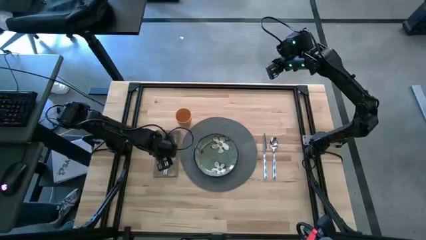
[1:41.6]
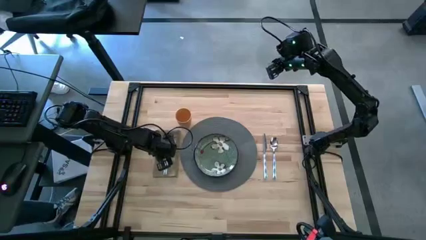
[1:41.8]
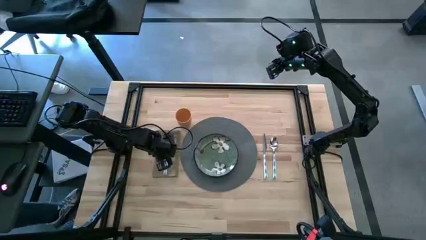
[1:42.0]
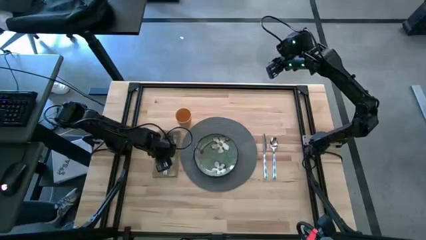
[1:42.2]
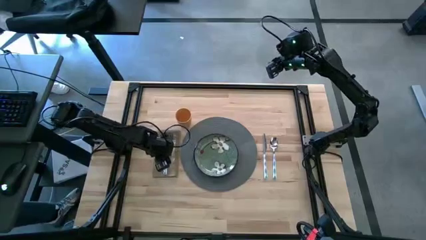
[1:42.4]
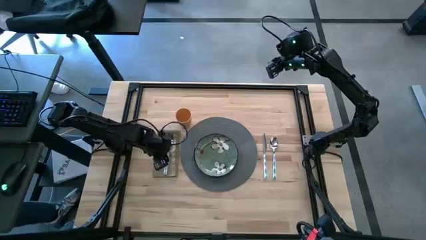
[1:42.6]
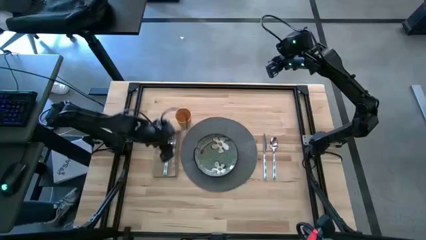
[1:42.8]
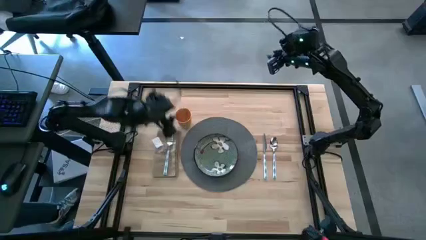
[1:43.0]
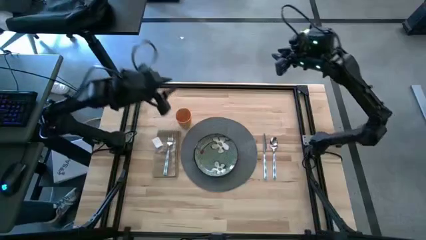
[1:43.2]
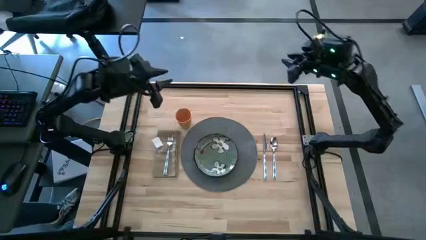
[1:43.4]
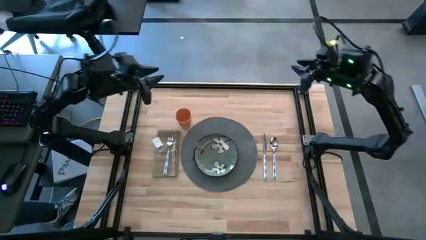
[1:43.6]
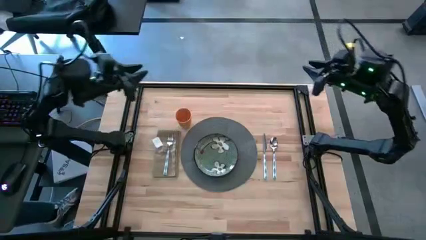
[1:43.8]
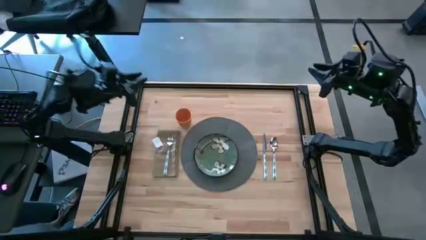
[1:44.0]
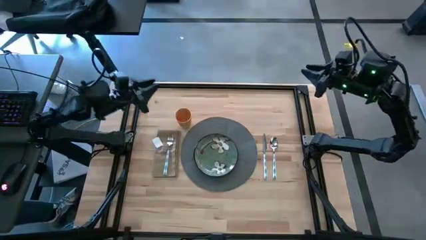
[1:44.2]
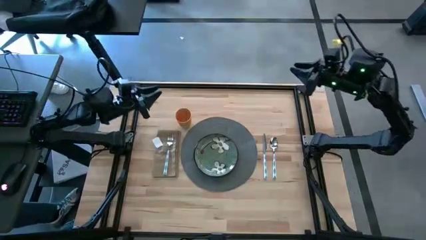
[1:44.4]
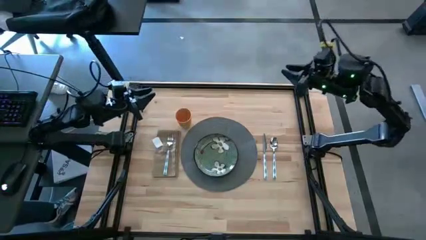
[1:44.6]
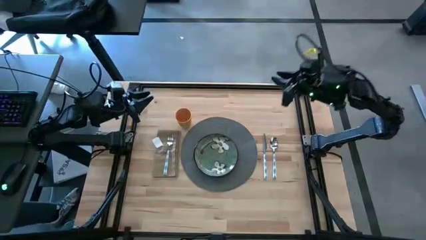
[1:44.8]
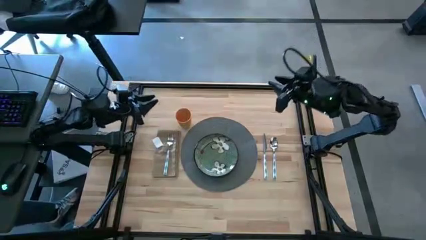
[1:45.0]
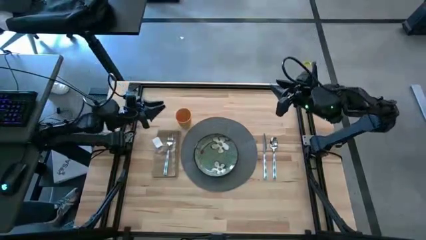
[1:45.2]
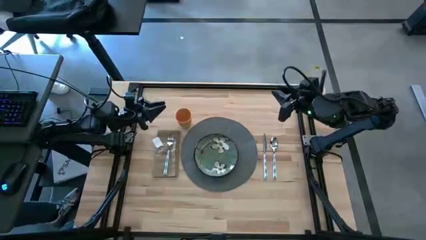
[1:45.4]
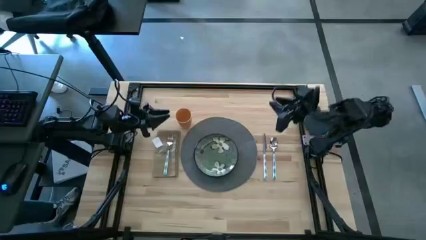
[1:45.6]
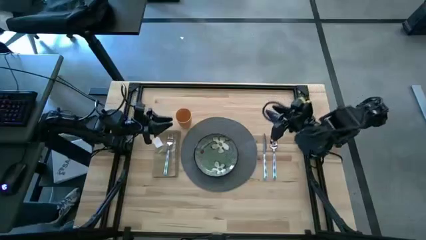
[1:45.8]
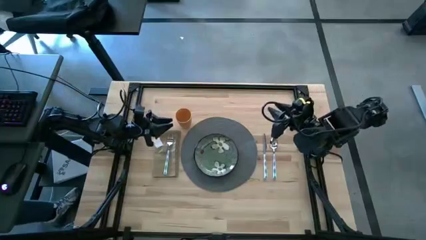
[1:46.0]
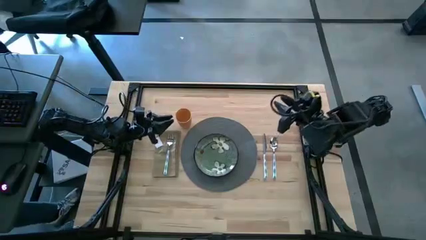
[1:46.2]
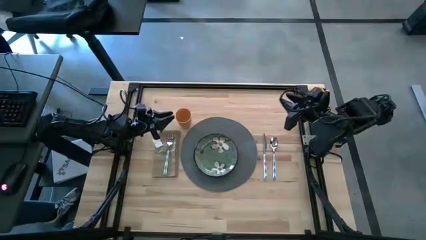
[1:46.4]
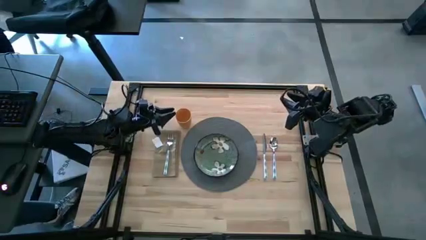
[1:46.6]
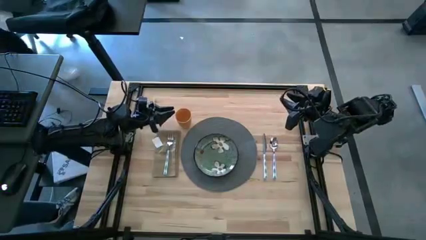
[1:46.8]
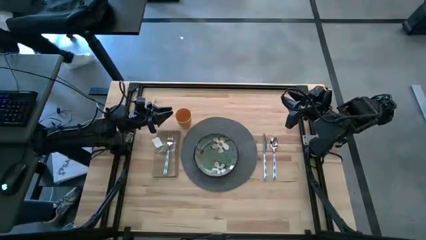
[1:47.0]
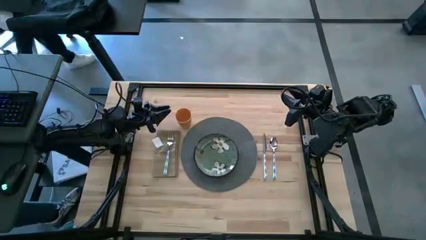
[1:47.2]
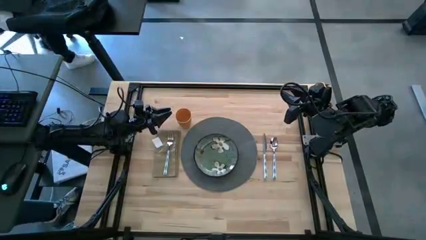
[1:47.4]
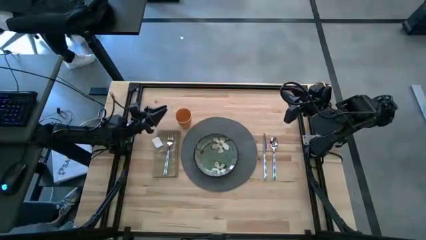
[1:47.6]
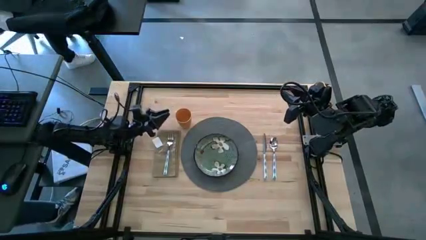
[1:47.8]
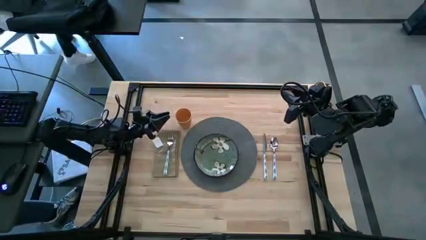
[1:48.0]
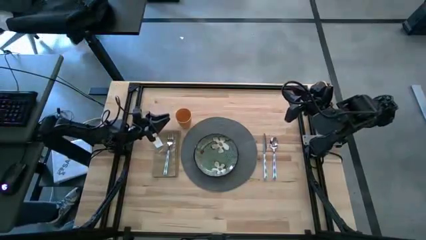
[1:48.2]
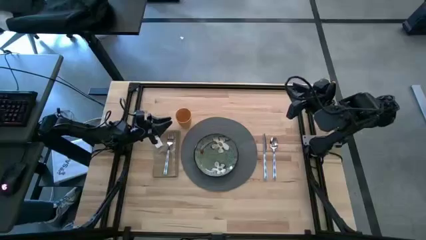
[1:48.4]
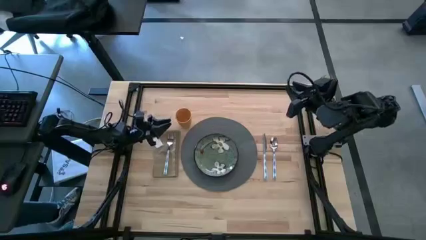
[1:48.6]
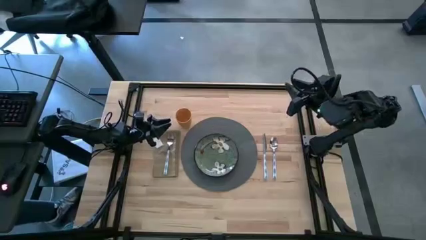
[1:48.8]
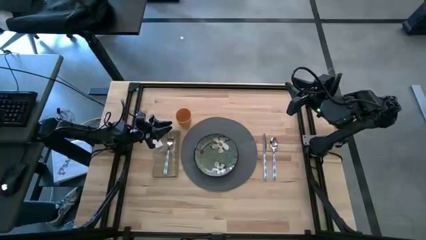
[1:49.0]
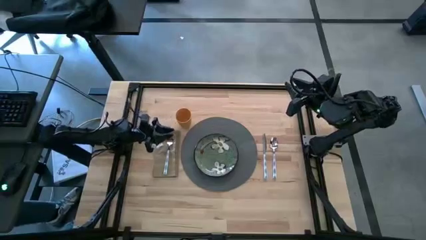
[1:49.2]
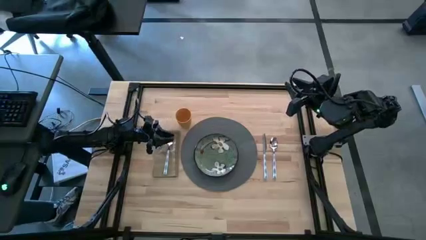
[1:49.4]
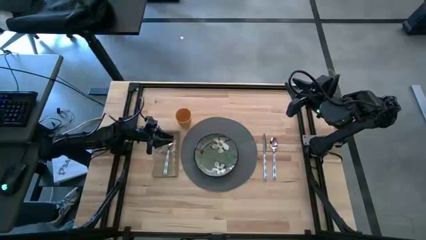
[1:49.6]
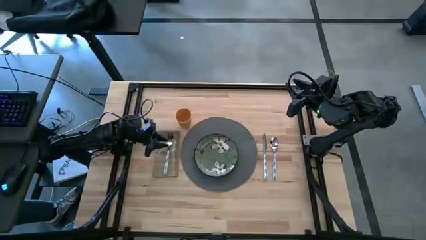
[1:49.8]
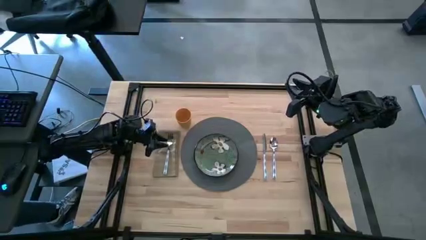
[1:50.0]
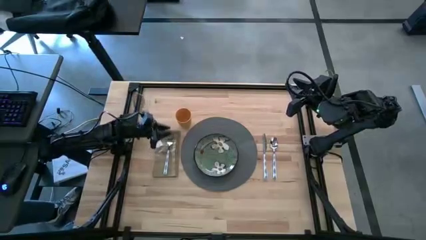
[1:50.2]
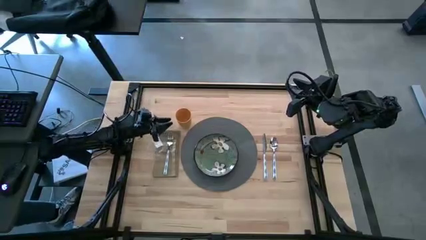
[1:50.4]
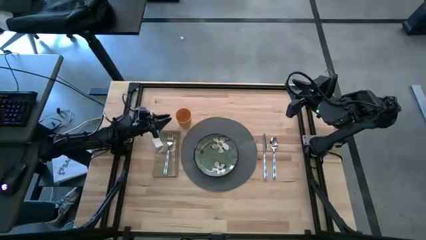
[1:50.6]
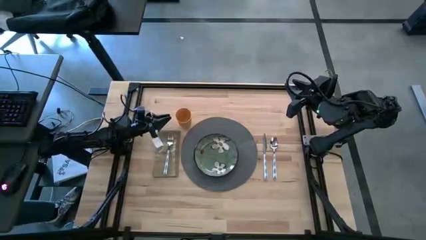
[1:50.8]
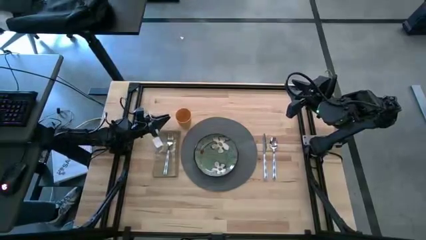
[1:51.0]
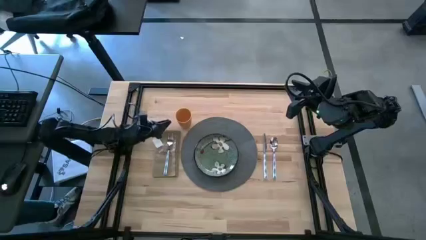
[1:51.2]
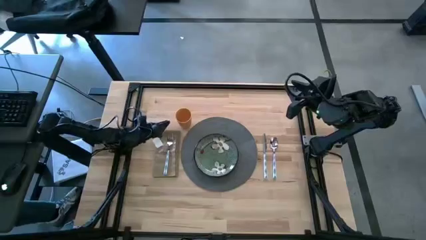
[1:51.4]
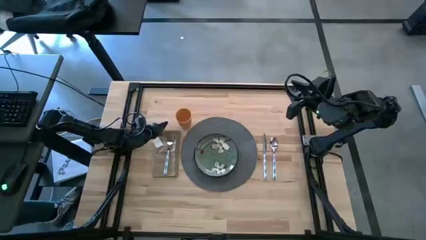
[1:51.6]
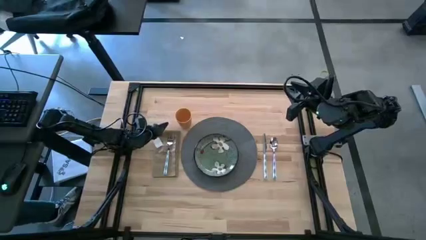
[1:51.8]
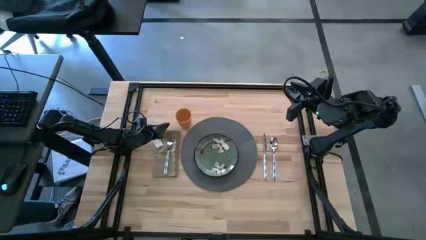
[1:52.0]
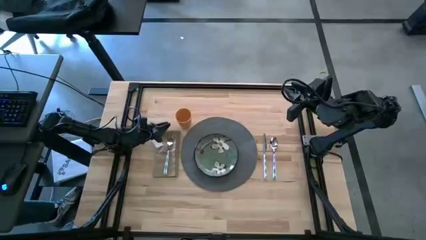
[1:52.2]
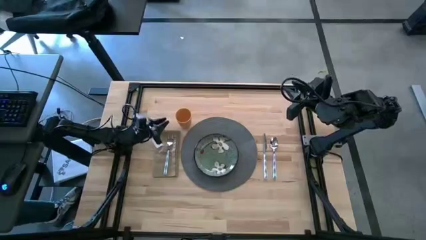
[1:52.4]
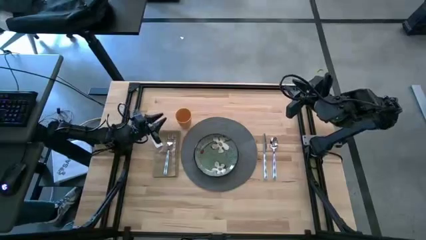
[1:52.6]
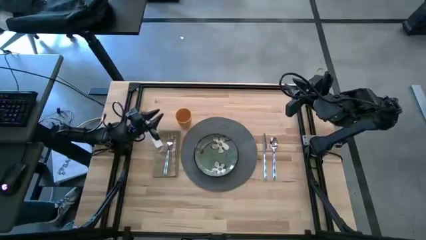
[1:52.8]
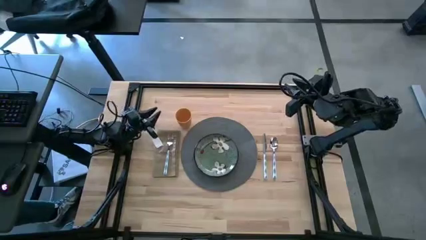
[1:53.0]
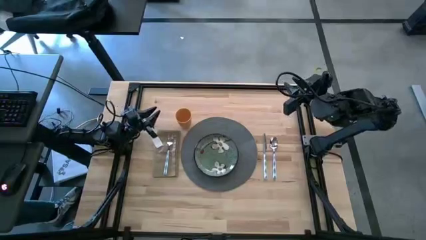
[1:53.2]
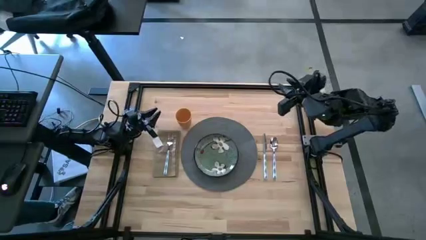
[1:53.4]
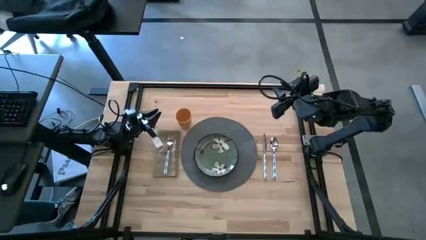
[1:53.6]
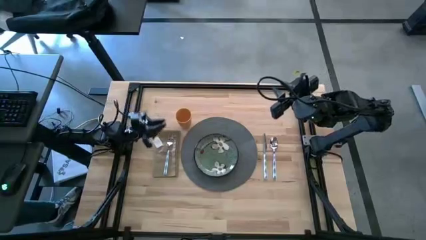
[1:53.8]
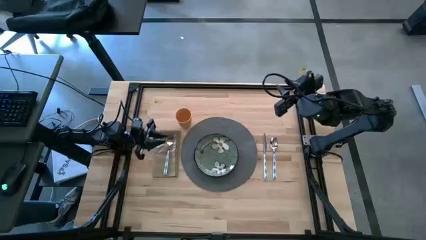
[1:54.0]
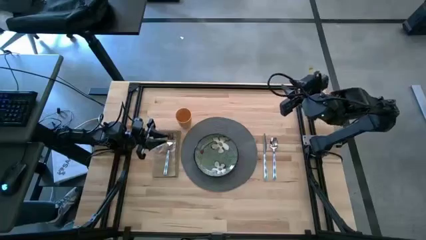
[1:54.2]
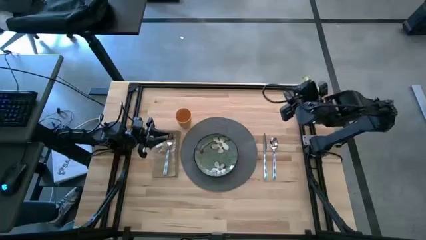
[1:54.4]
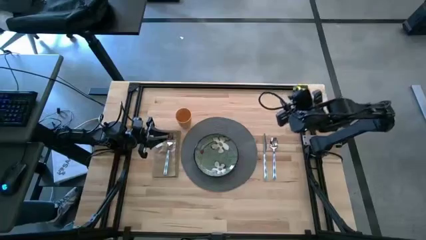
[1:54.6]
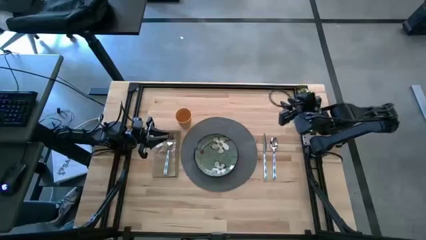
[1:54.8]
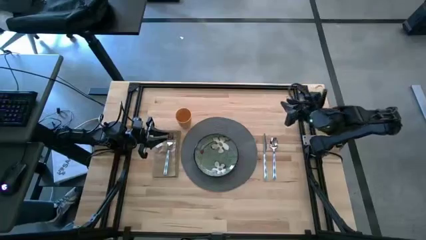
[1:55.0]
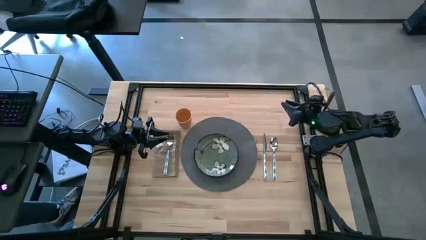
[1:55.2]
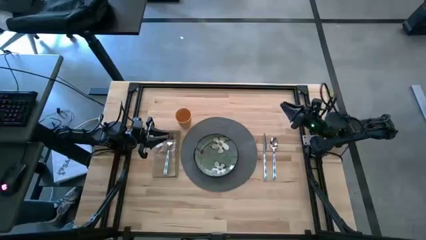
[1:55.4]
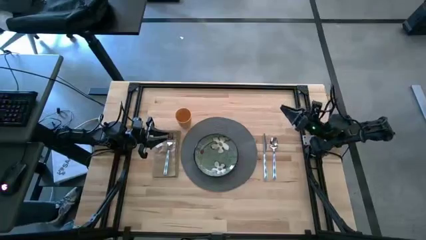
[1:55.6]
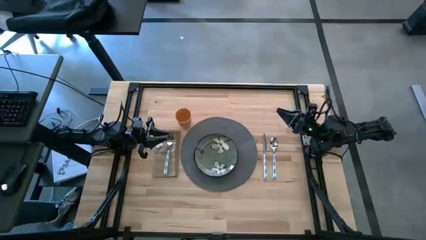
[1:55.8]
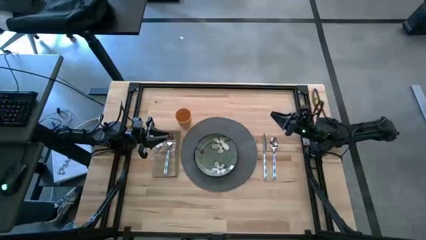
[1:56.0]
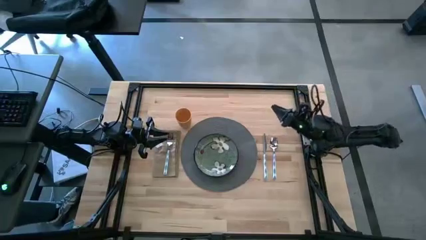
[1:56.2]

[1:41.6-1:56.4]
Task: Set table place
Return to Home Position

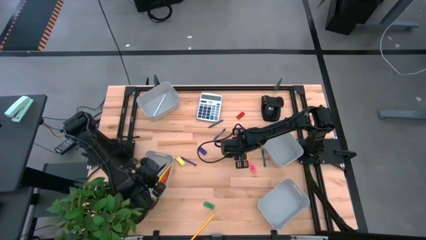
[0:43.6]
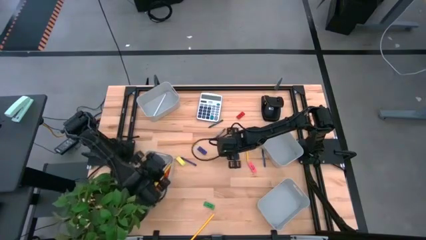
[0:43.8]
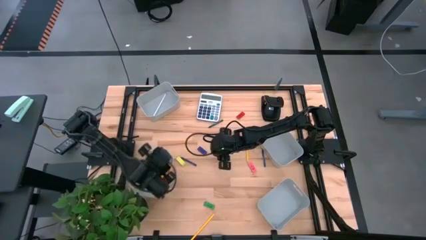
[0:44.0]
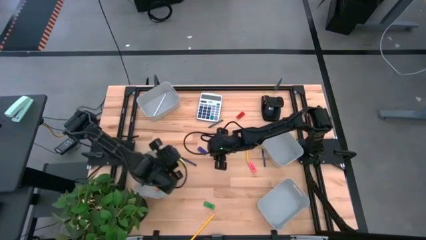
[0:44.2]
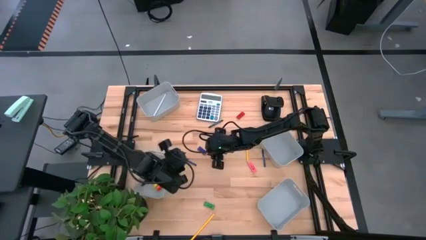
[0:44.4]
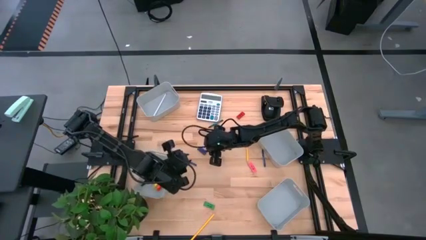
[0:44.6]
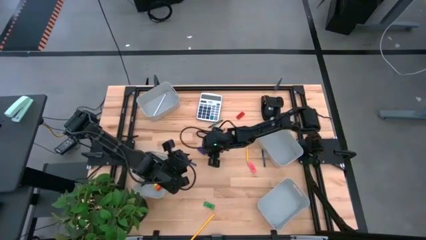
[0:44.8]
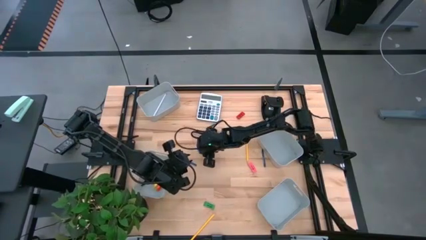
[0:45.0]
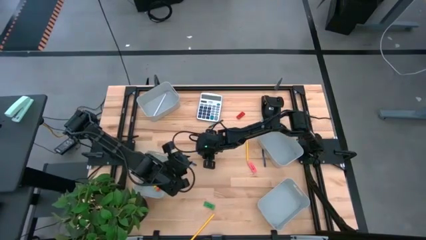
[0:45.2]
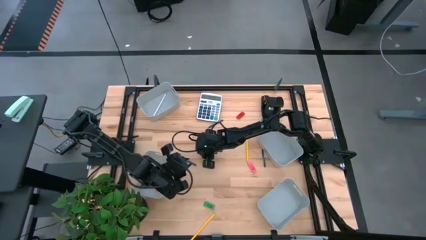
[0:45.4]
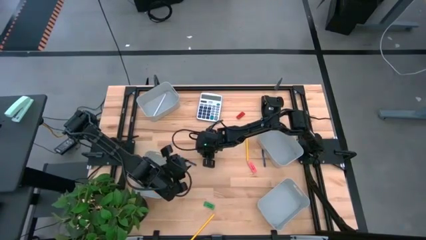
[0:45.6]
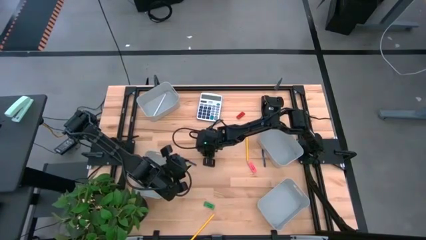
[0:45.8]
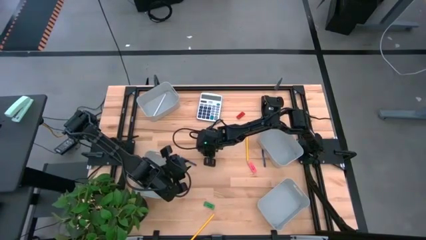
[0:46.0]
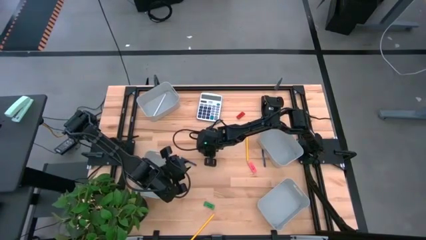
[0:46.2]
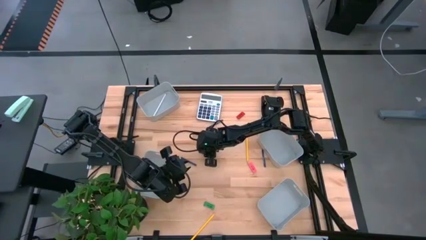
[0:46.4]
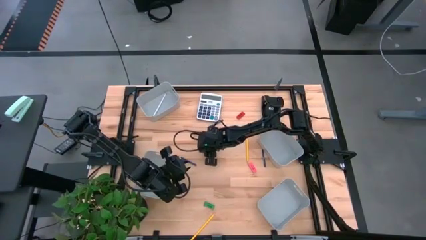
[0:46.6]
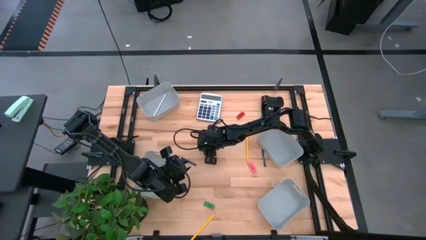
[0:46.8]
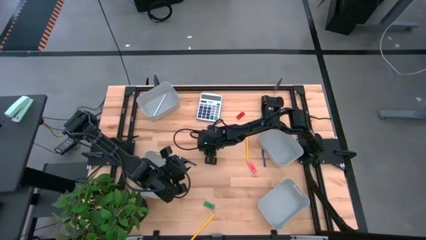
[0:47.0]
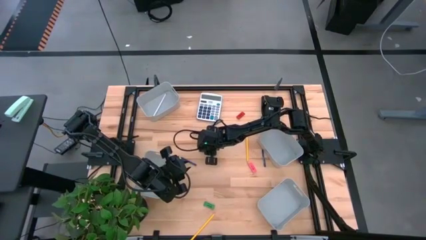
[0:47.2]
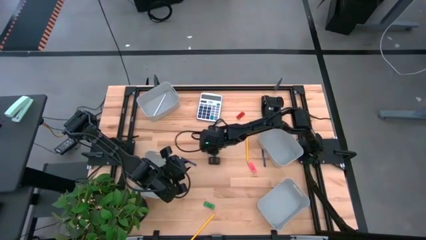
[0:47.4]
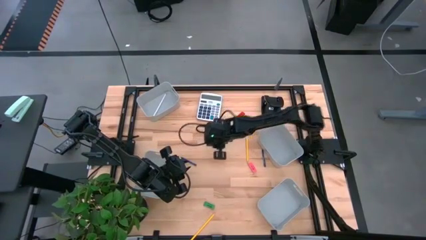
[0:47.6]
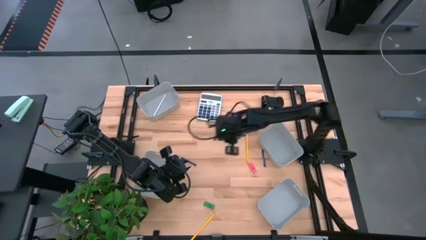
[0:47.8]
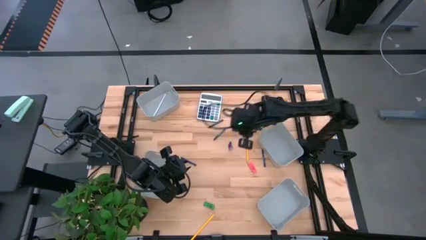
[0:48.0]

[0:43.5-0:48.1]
Task: Sort crayons/erasers/pens/pencils in bins
Put the blue eraser into the top left gray bin
